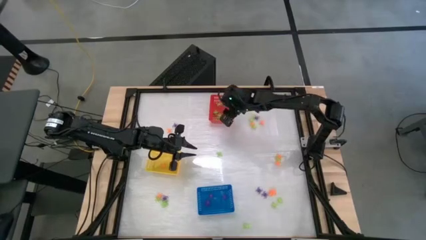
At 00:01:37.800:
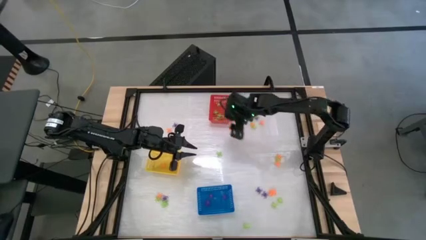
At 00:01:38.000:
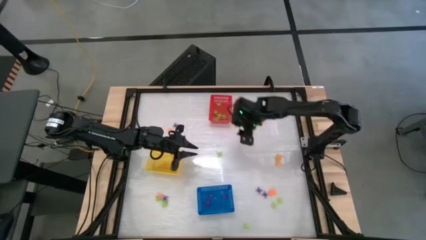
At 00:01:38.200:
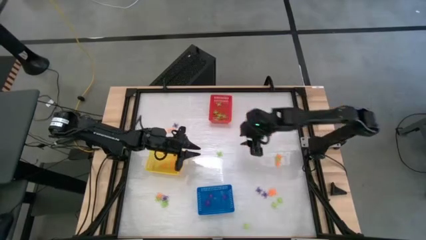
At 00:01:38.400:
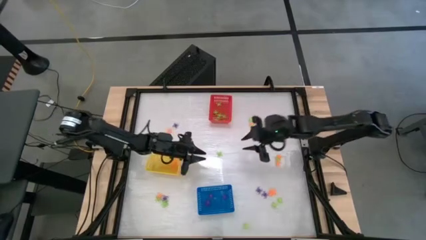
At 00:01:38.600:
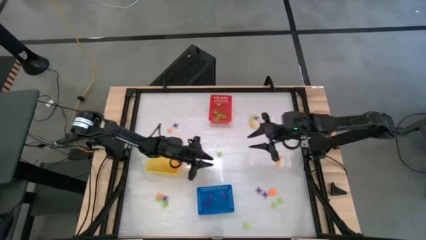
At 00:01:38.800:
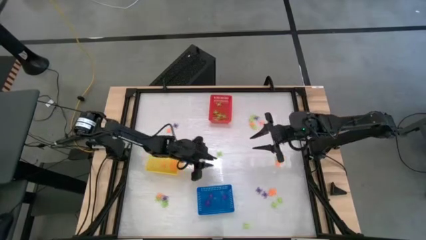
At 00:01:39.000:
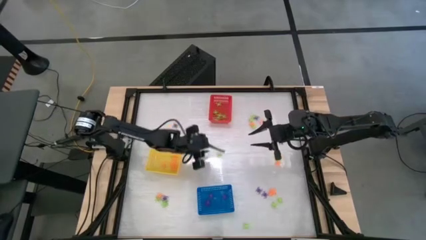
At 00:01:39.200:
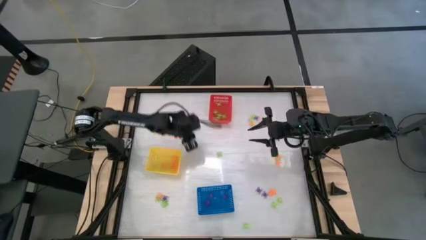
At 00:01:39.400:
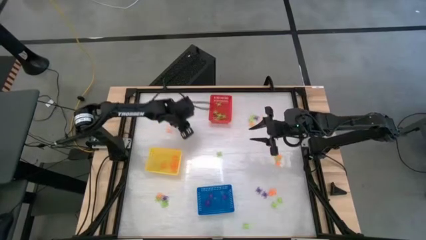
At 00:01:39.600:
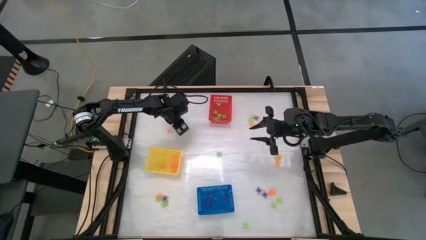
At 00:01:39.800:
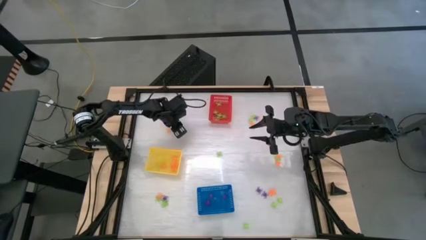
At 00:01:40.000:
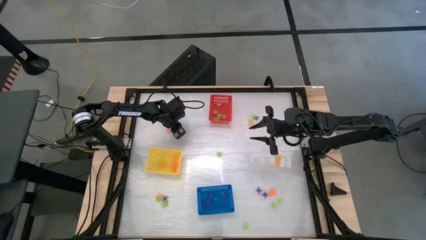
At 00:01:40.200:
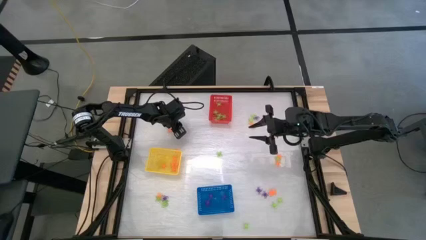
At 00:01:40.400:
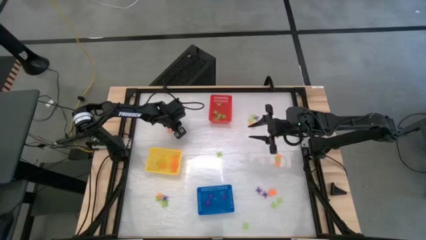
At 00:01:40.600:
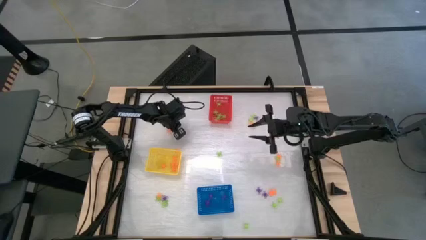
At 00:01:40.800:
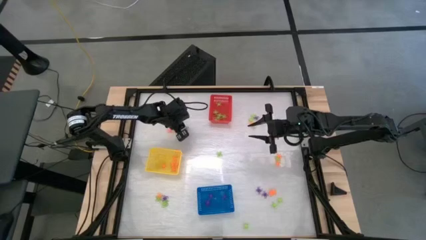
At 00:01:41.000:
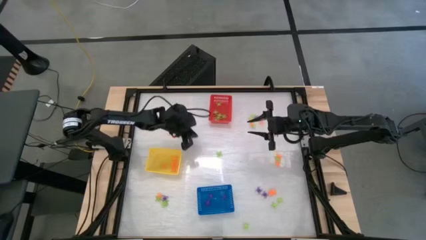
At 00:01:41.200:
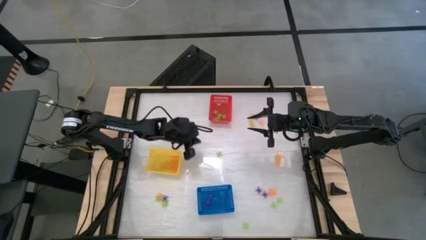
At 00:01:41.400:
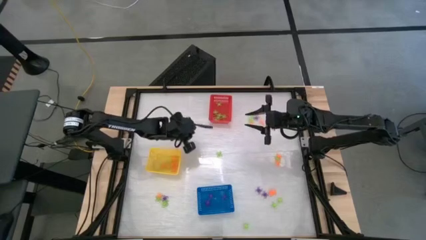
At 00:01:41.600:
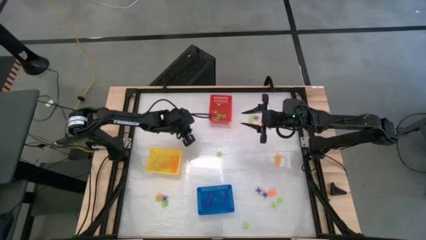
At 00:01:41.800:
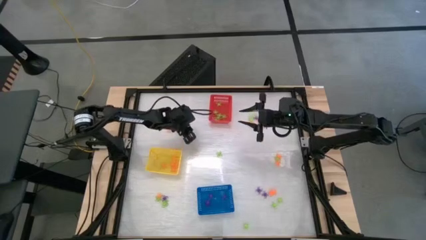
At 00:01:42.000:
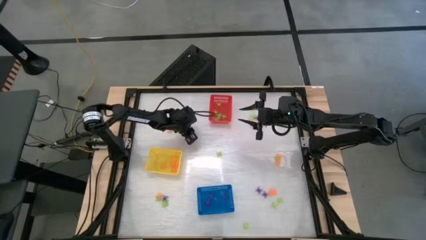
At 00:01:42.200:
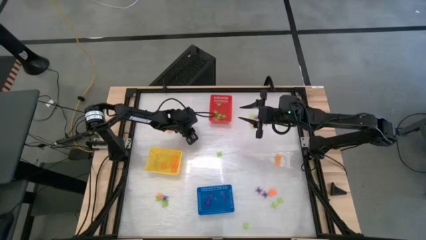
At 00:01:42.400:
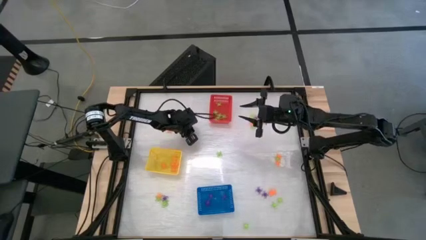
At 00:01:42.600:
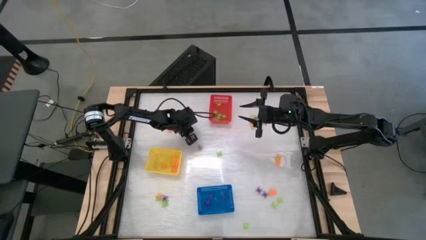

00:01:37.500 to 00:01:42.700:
Task: Sort Halloween decoration
Put the purple spider toy into the blue basket

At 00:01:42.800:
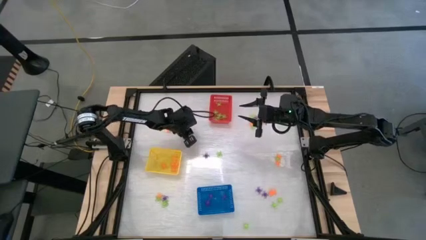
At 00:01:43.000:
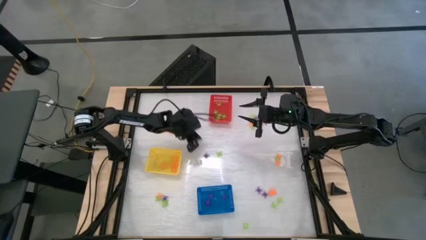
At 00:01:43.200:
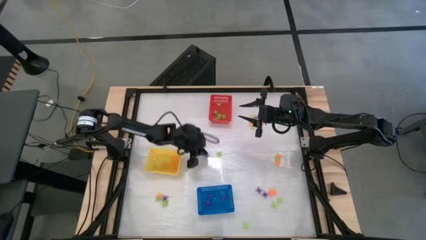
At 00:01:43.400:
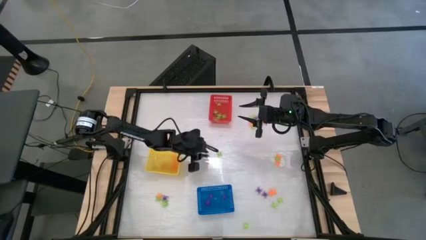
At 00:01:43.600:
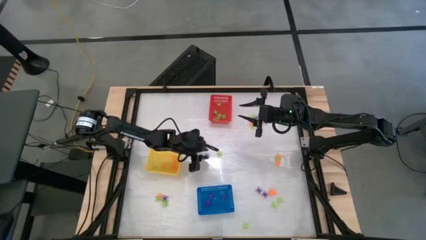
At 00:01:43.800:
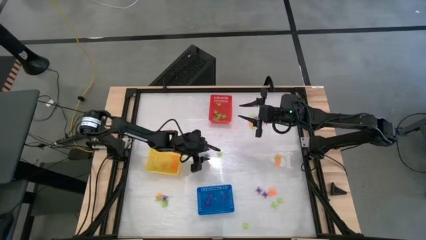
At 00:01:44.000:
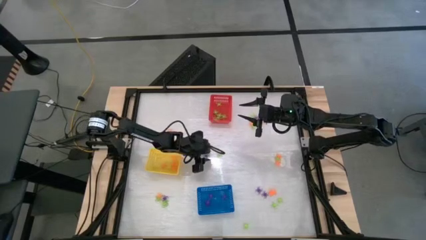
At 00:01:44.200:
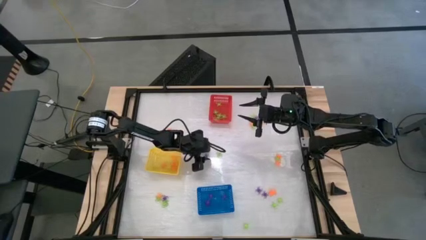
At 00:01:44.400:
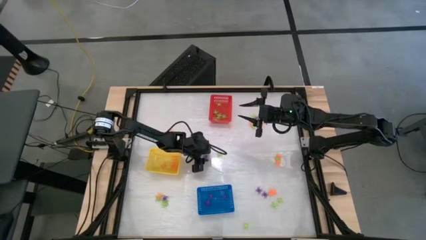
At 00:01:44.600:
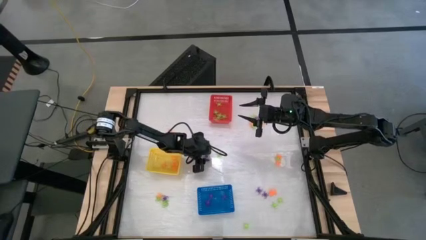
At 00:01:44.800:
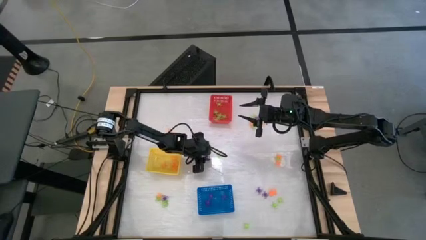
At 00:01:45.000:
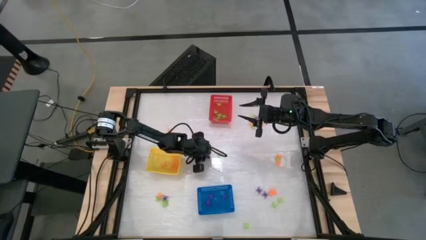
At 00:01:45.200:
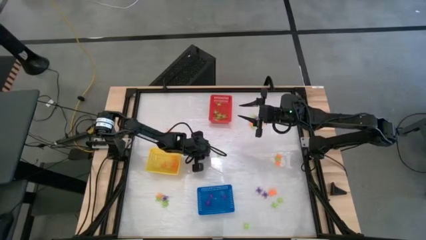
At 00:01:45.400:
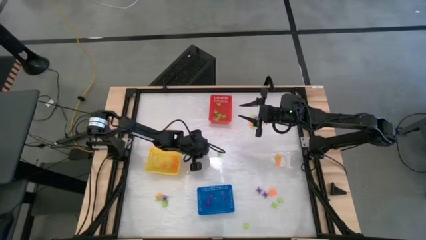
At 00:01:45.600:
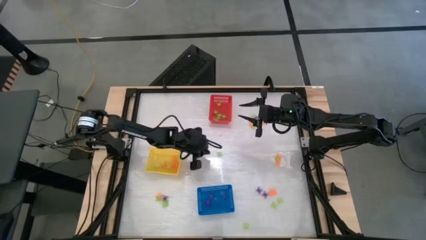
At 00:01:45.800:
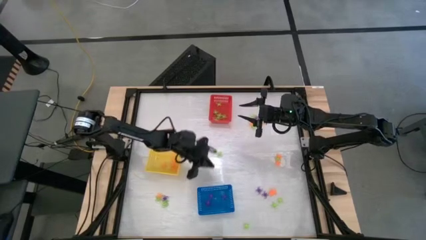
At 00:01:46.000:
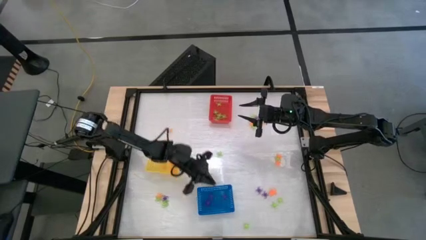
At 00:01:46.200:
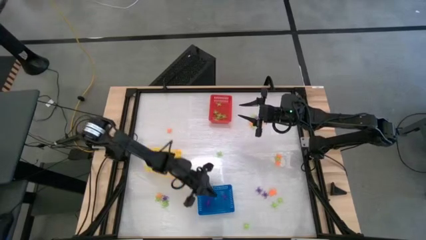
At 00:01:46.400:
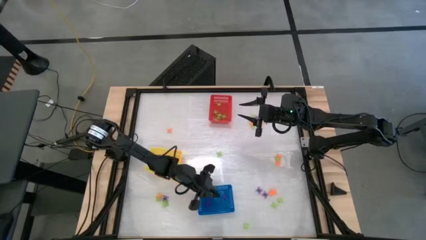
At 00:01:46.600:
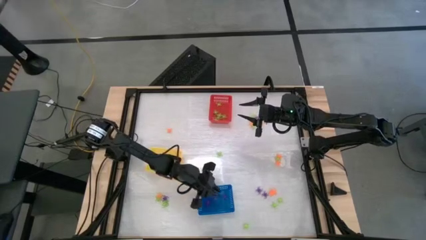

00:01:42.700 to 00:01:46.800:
Put the purple spider toy into the blue basket

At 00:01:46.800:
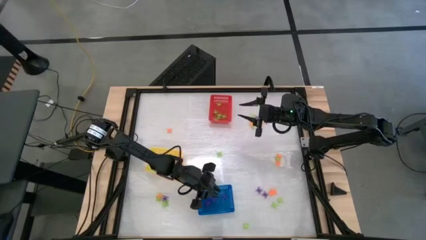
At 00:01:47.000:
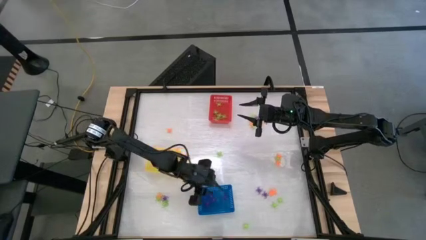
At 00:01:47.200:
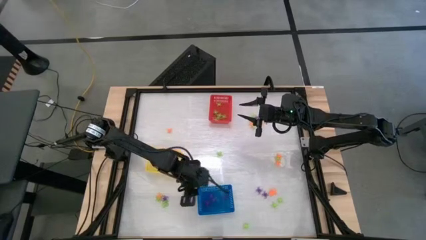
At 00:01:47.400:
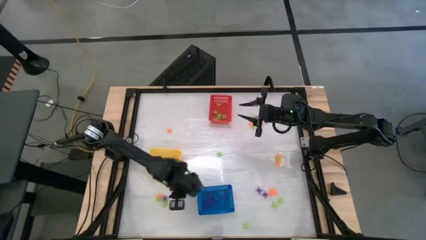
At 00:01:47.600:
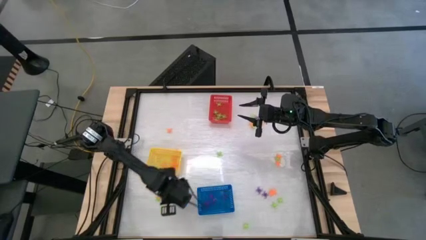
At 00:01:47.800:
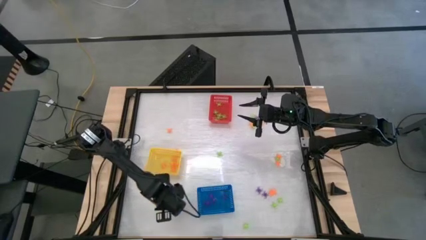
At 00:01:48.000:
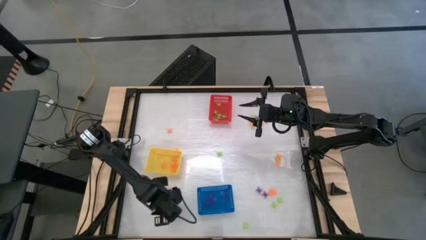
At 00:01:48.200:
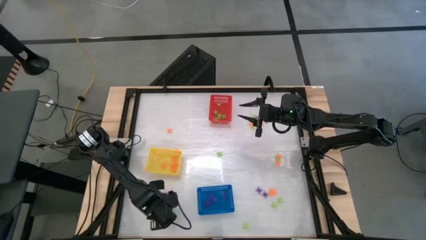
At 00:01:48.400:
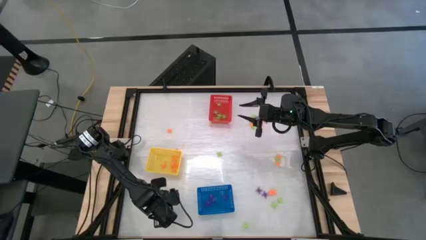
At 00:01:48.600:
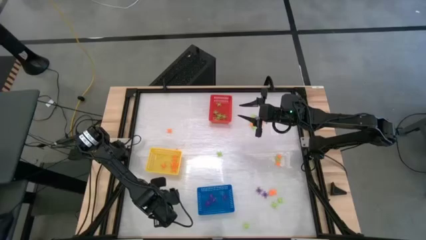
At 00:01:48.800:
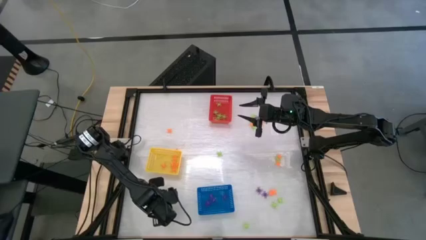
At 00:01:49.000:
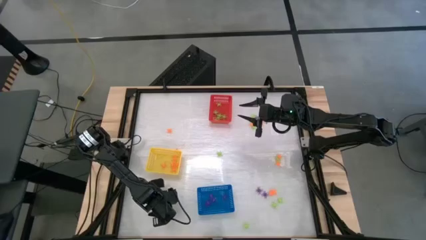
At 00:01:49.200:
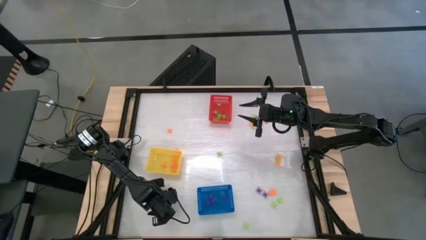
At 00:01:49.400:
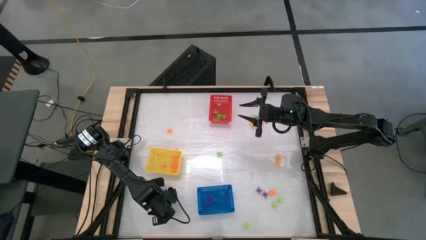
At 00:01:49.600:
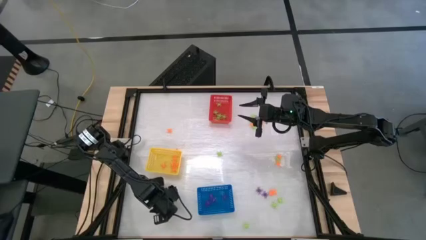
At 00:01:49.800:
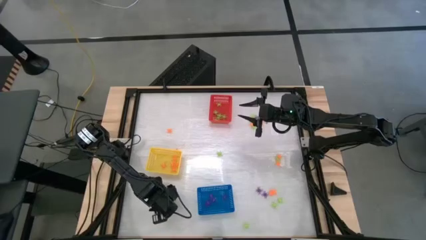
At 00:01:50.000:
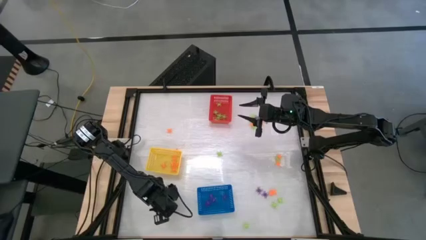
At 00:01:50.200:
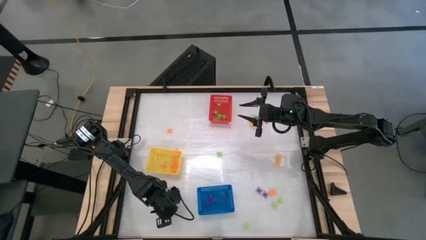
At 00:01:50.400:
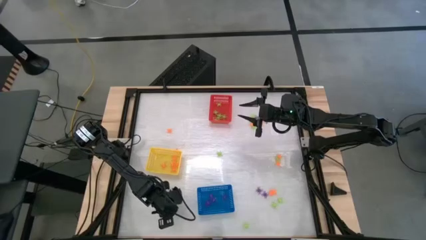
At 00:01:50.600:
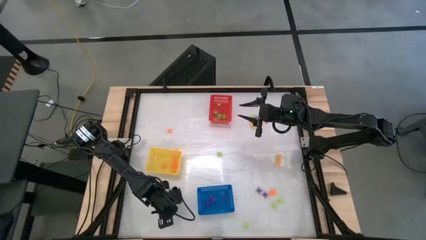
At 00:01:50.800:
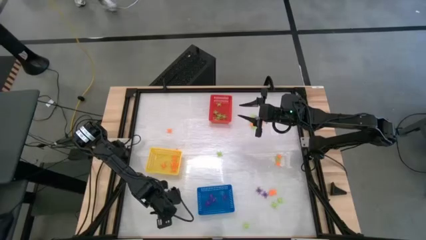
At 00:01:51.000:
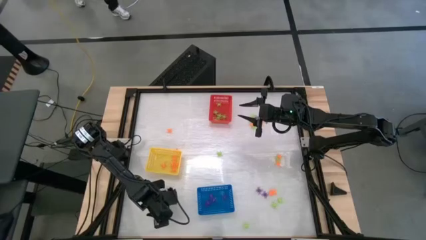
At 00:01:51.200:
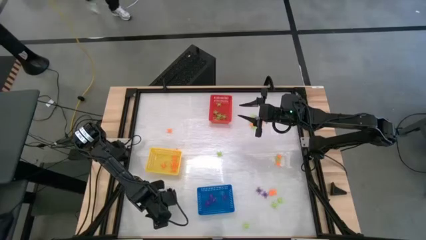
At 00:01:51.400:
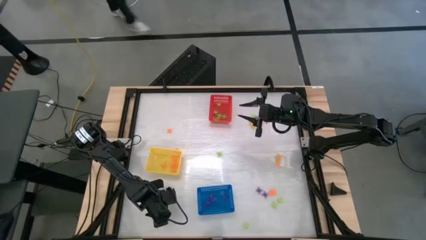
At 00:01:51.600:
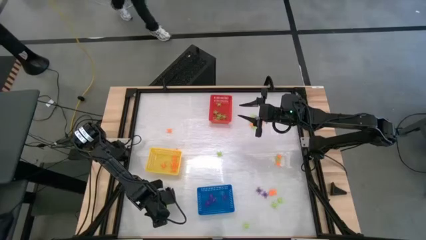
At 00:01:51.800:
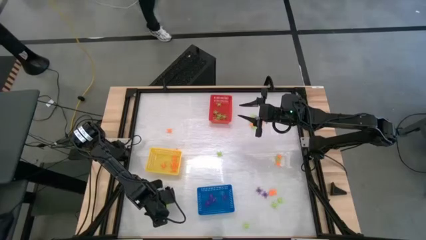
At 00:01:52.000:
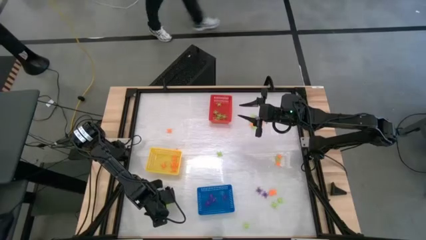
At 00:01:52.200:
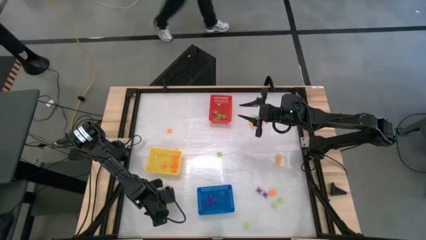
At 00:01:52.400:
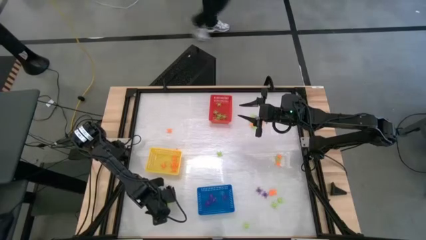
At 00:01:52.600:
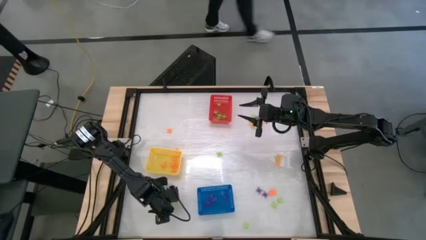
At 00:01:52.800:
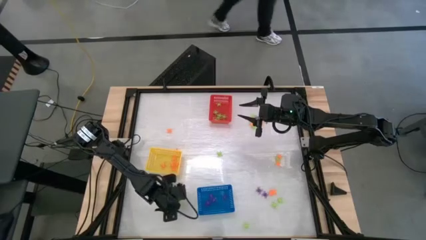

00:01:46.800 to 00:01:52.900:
Put the green spider toy into the red basket

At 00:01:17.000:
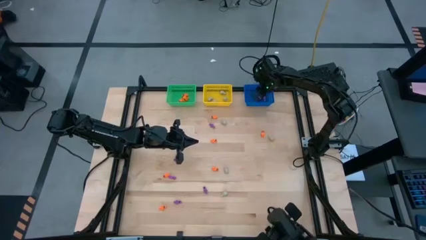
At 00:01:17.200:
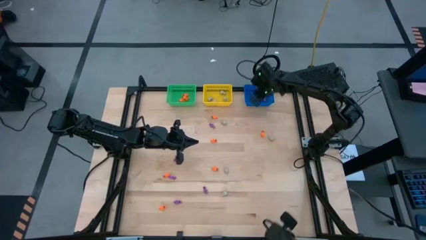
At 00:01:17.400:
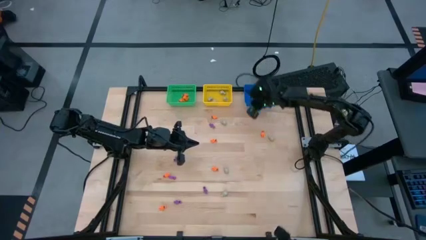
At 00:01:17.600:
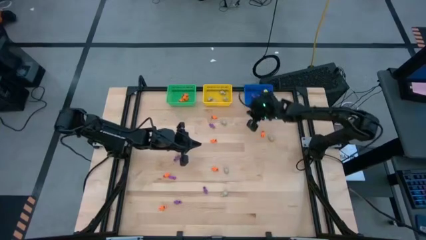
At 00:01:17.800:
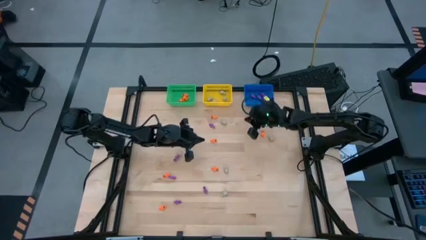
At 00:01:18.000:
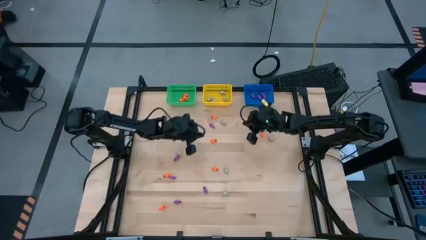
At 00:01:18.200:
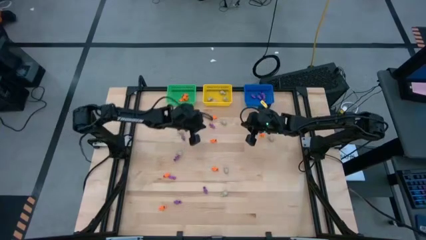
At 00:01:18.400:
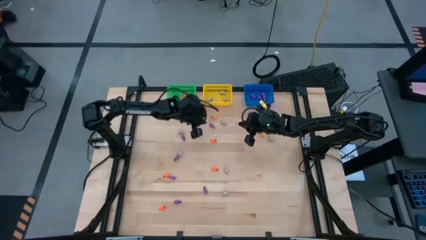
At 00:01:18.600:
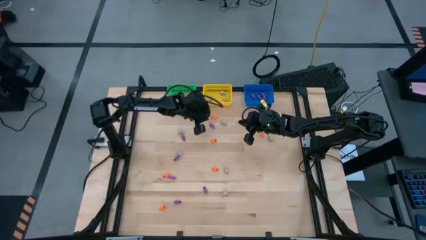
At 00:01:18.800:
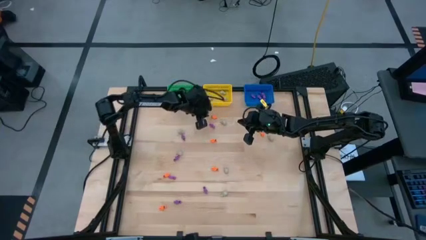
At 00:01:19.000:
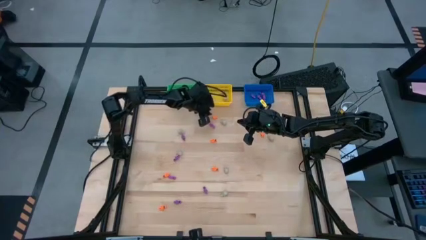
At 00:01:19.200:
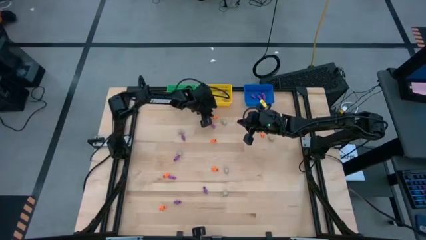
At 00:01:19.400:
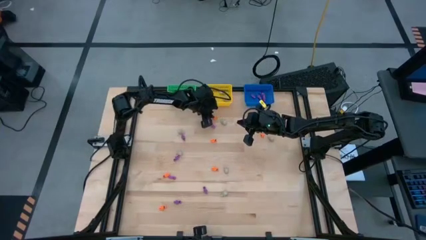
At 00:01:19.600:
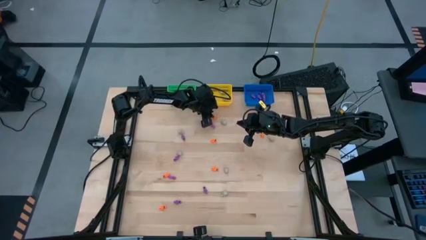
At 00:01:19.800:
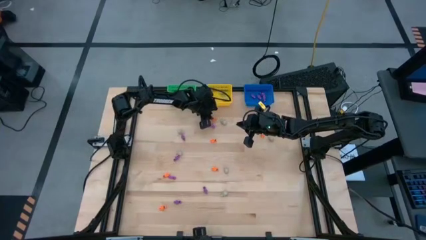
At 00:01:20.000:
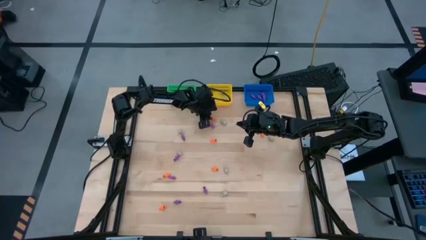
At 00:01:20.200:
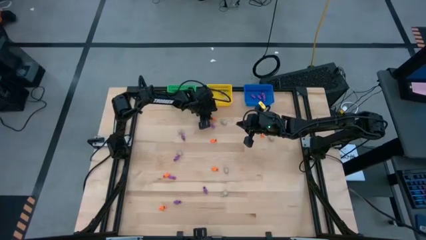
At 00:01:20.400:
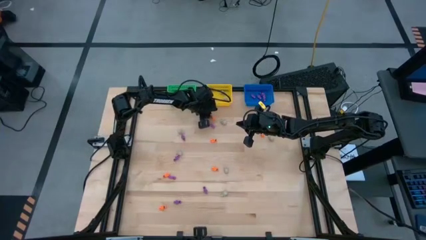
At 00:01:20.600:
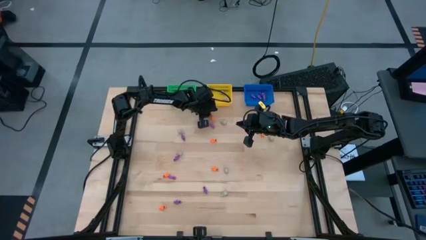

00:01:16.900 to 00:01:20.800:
Task: Sort Halloween decoration
Put the orange skeleton toy into the green bin
